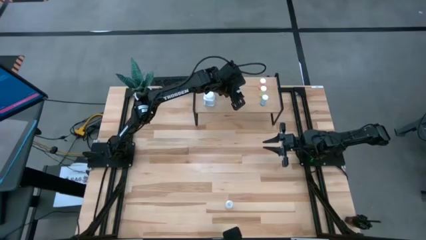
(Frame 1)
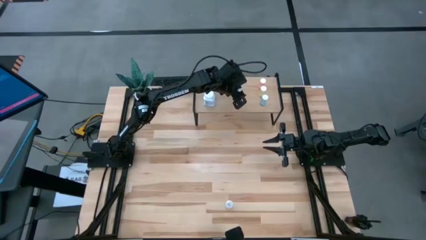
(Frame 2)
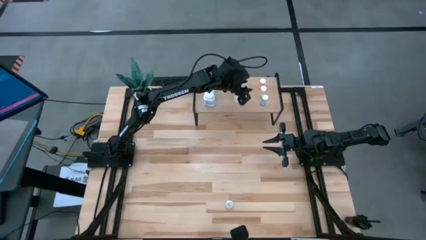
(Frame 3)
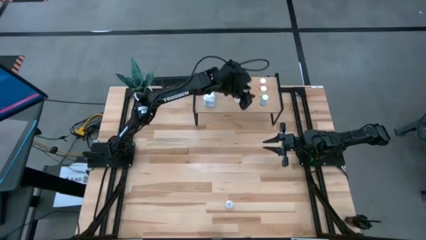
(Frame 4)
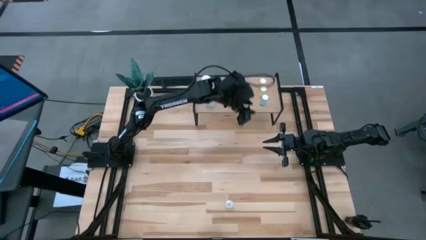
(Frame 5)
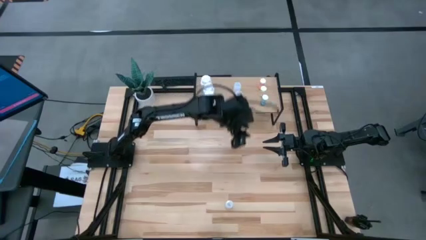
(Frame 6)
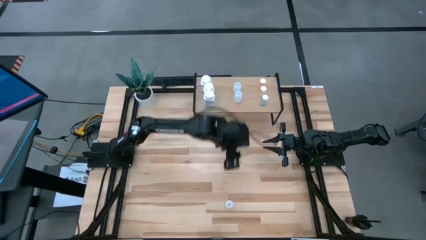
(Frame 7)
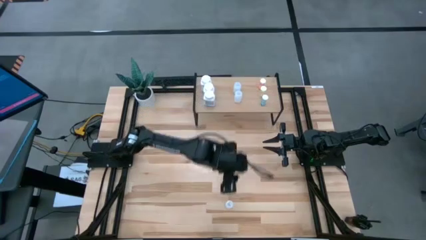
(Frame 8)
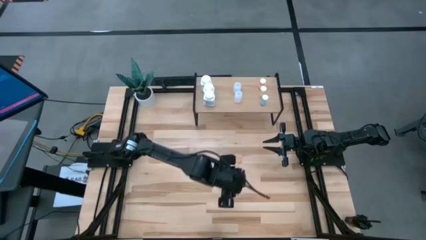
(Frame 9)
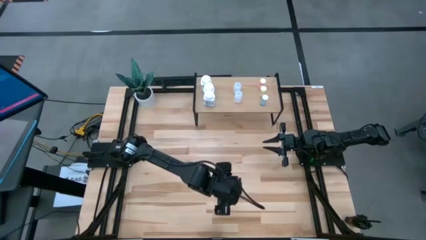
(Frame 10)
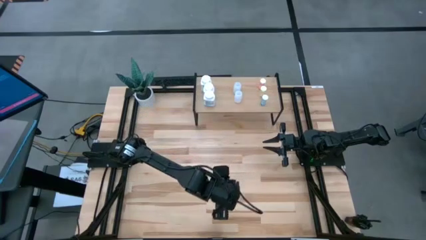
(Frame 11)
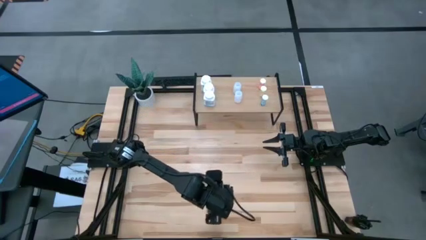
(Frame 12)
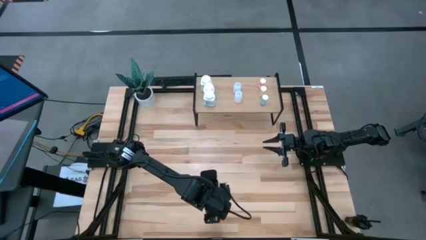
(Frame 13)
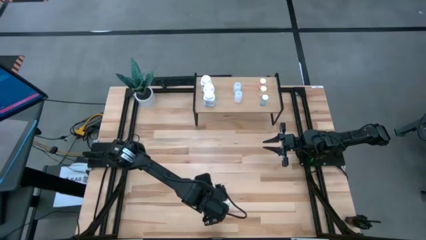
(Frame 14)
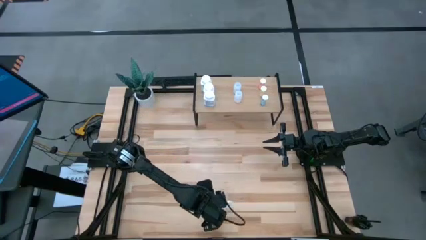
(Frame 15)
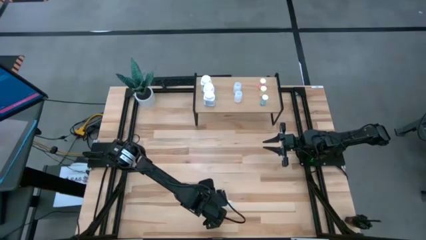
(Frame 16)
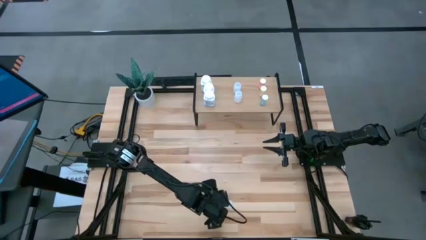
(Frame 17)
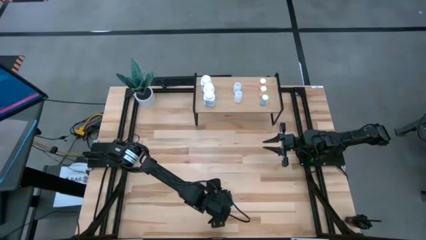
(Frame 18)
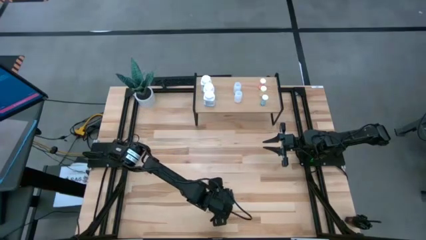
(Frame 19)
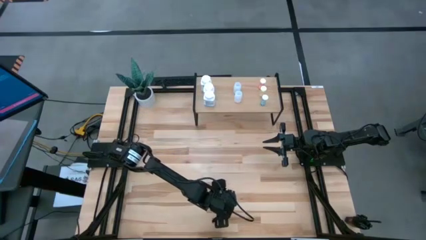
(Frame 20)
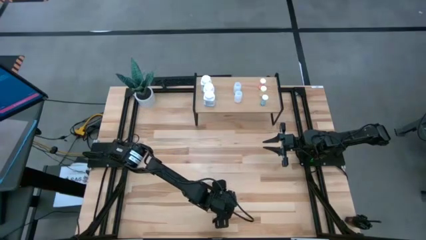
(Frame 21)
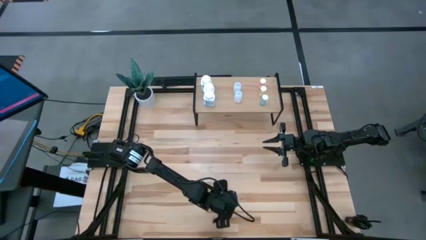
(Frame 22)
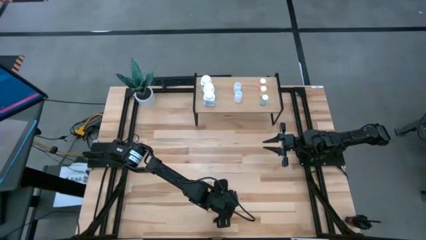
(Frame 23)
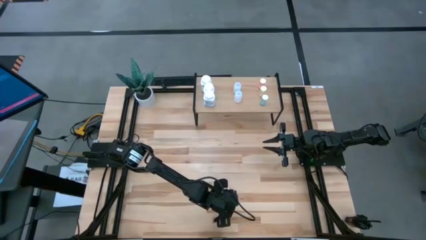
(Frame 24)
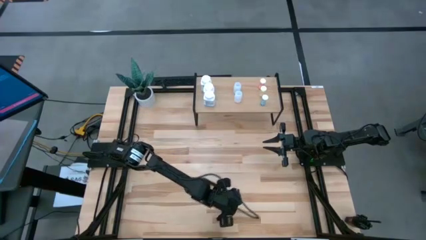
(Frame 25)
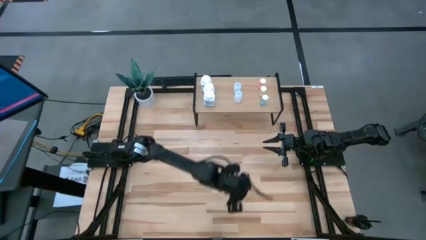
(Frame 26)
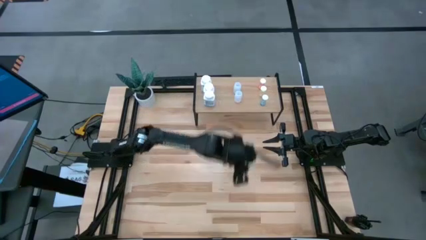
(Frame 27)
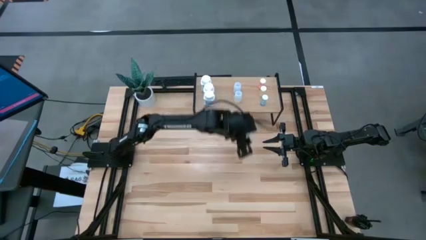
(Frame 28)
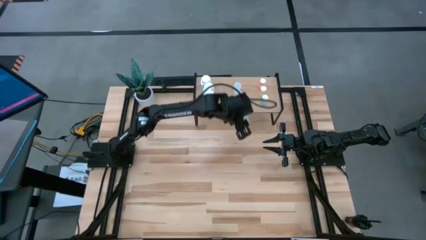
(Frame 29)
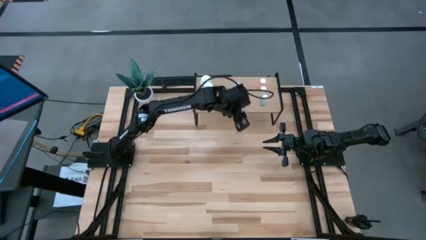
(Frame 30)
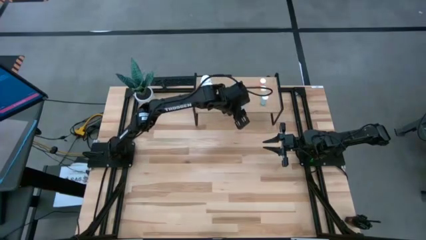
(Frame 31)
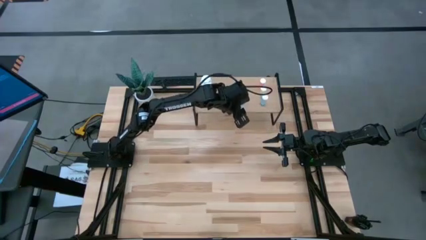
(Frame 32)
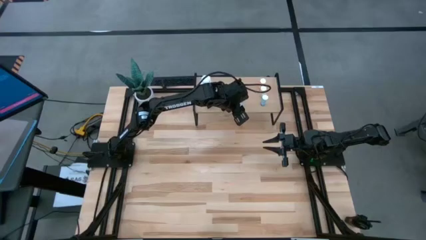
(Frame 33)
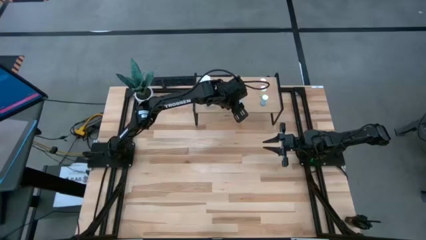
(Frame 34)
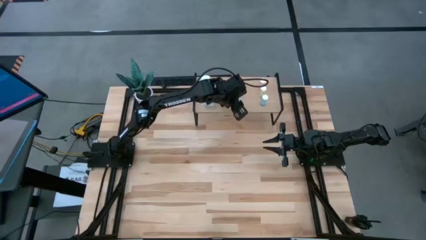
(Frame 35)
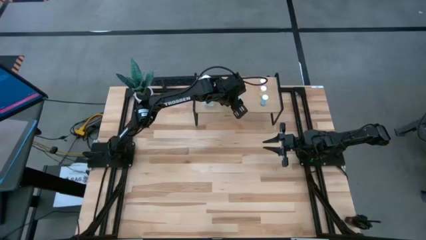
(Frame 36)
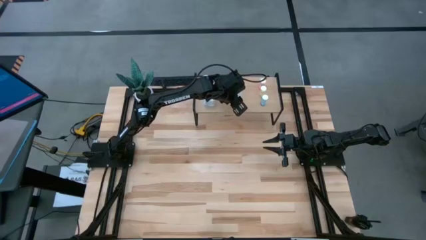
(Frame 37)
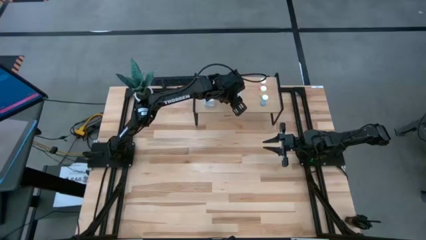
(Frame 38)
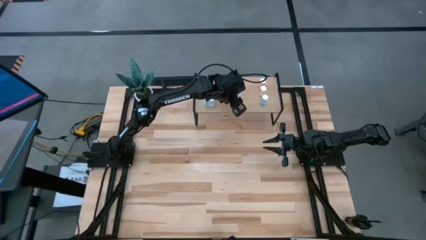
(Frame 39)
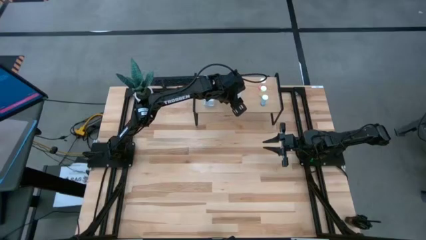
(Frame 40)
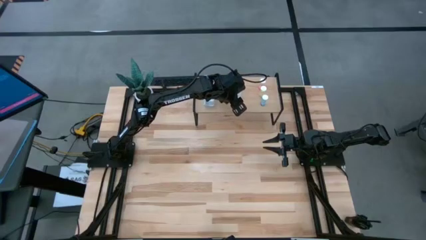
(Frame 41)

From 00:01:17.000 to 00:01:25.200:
Task: Pick and place medicine bottles onto shelf by color
Put the transparent pill bottle aligned with the other transparent pill bottle on the shelf

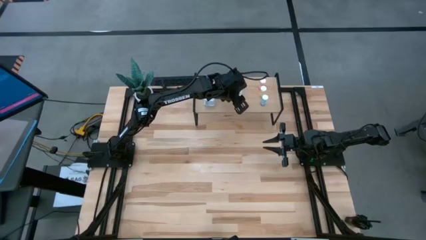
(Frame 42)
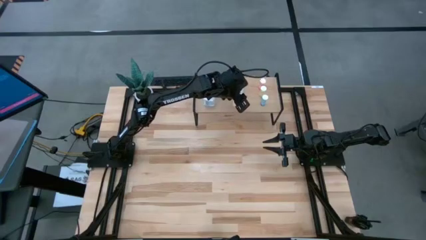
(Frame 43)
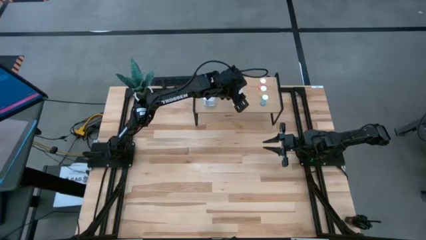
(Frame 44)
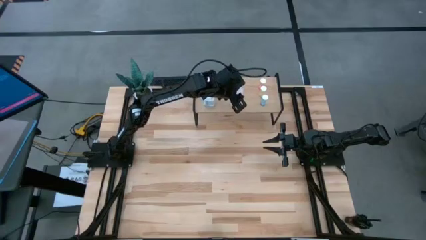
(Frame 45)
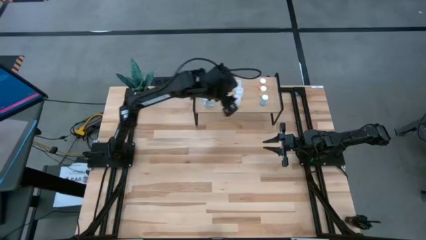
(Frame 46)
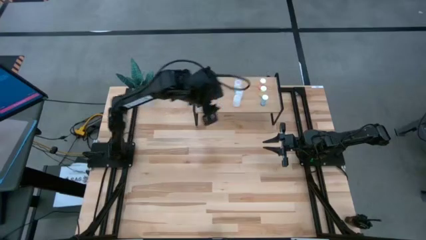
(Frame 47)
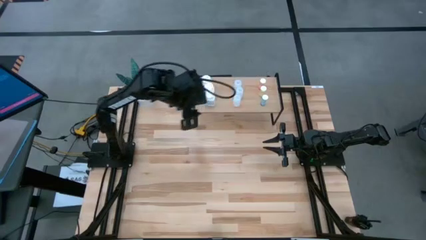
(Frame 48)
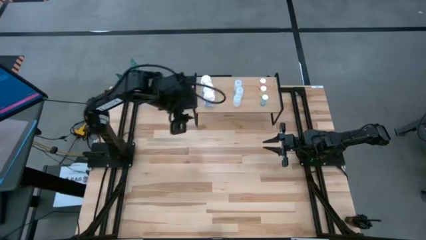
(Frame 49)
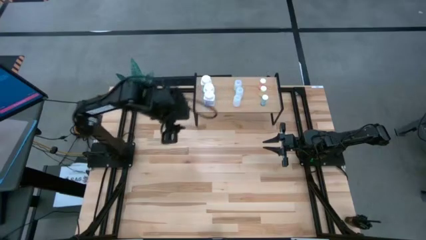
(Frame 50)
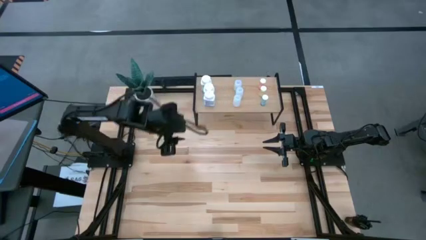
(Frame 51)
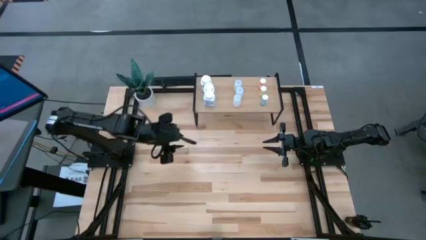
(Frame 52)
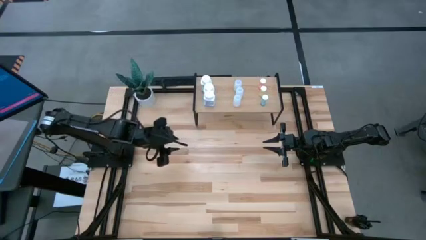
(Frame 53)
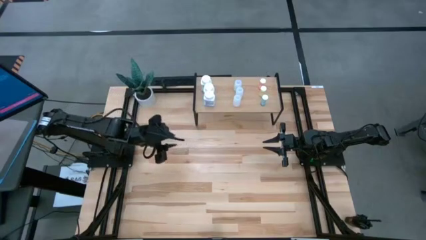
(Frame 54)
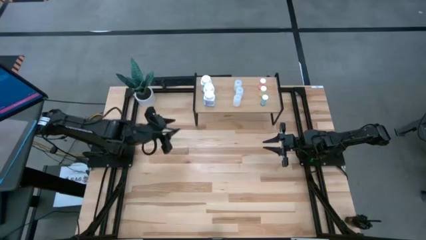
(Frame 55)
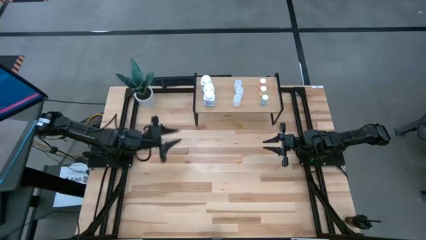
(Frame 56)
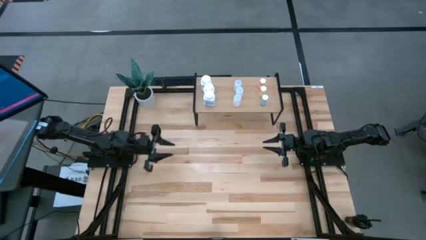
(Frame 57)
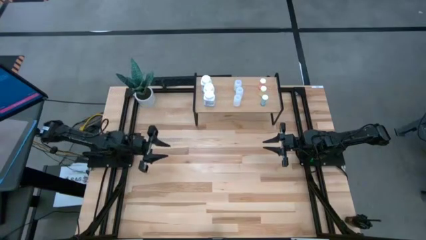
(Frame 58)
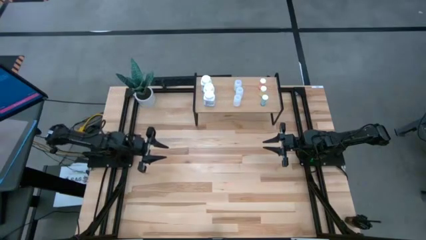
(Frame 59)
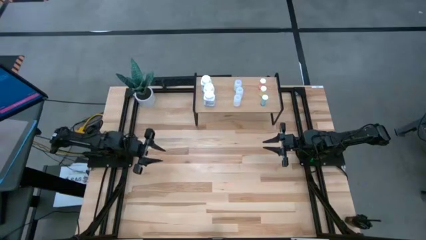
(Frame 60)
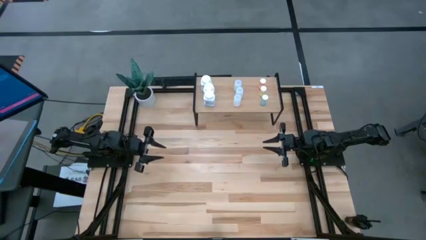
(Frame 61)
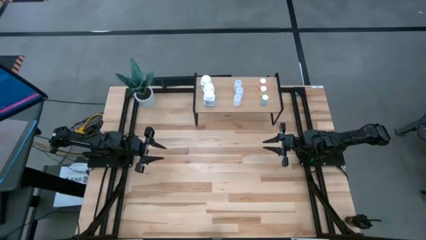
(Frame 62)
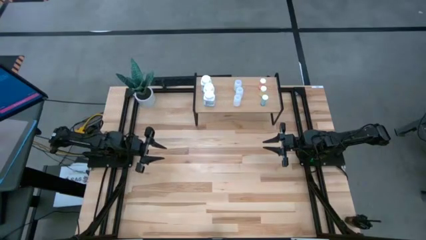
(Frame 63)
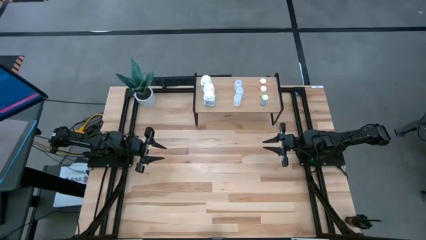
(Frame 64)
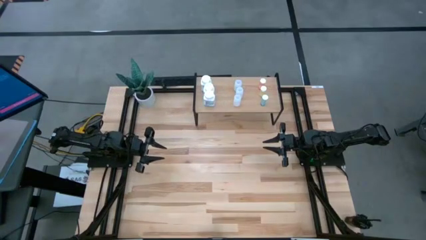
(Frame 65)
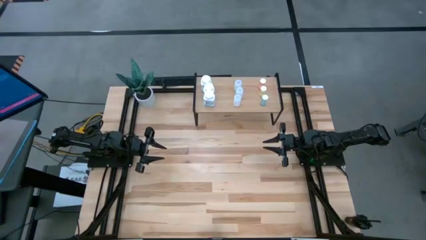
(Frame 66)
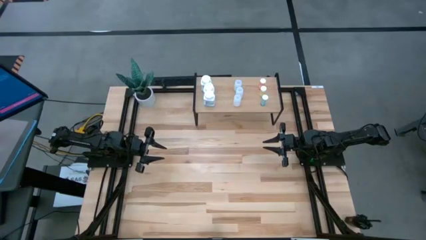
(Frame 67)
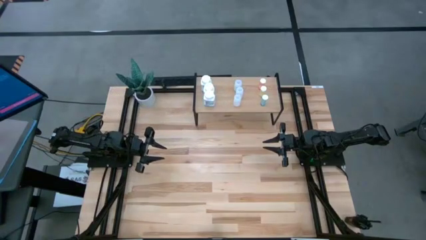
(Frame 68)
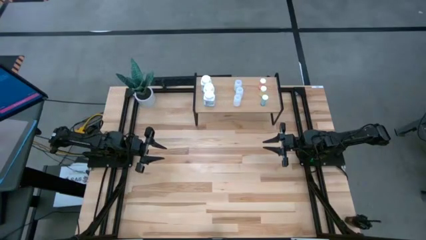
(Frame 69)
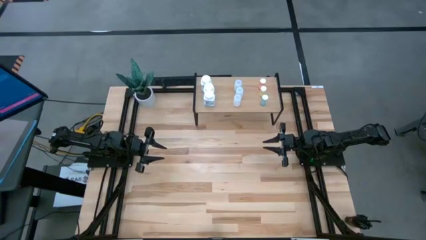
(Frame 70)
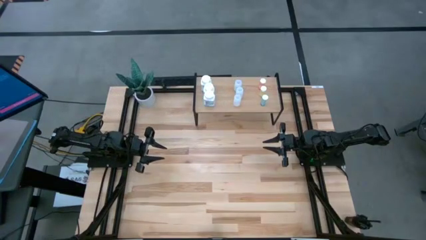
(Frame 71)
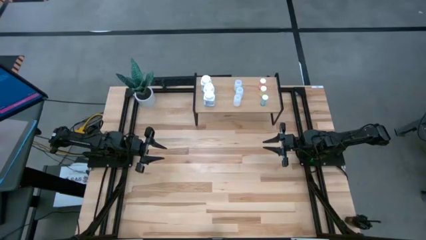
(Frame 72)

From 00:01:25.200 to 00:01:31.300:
Return to home position
